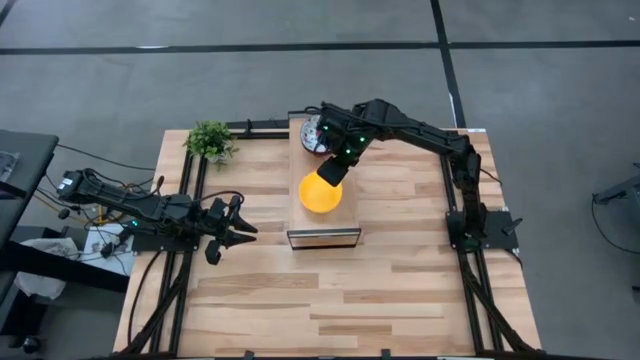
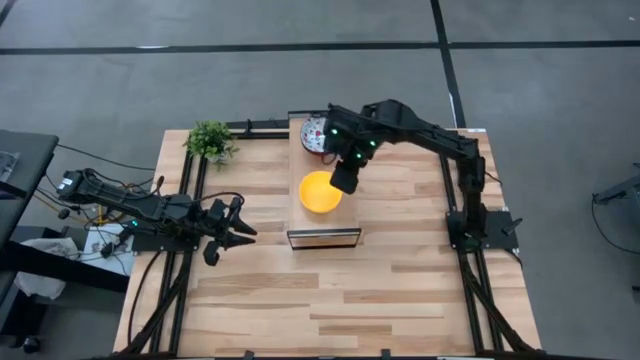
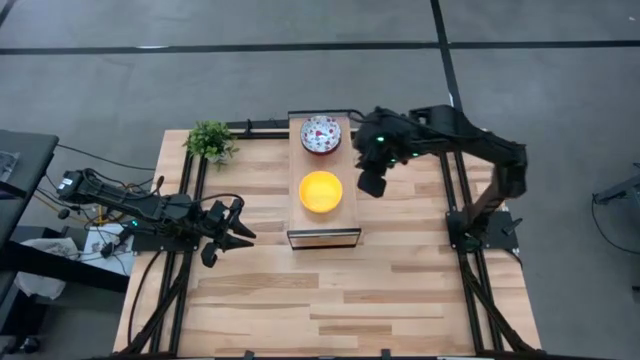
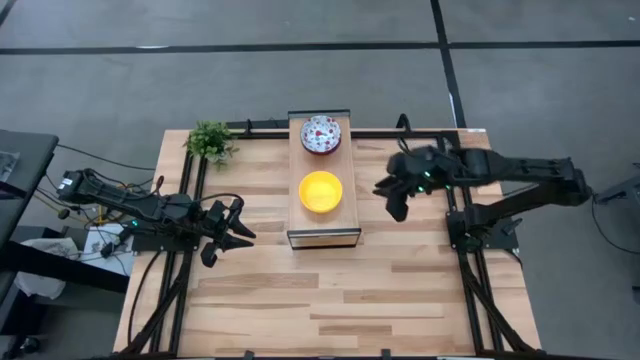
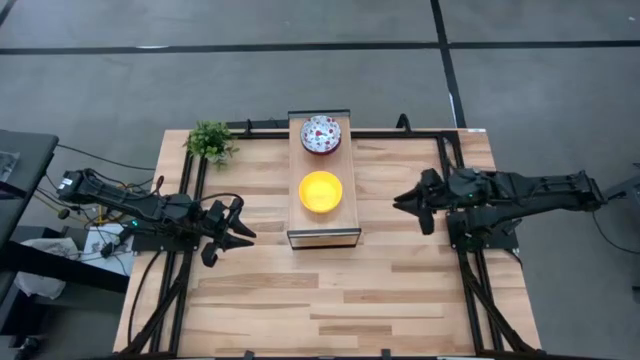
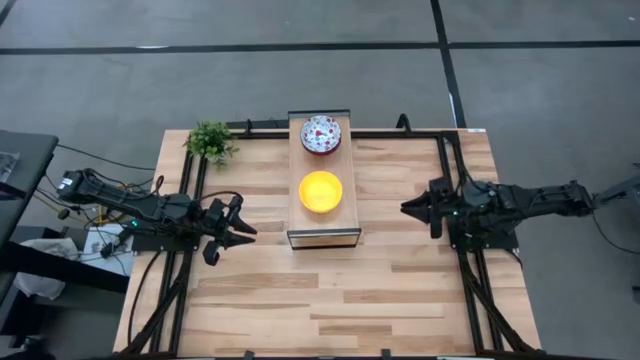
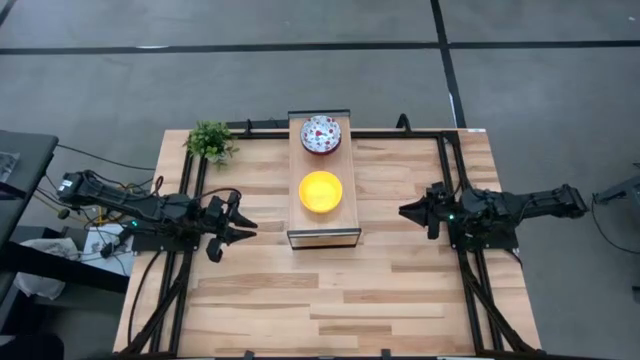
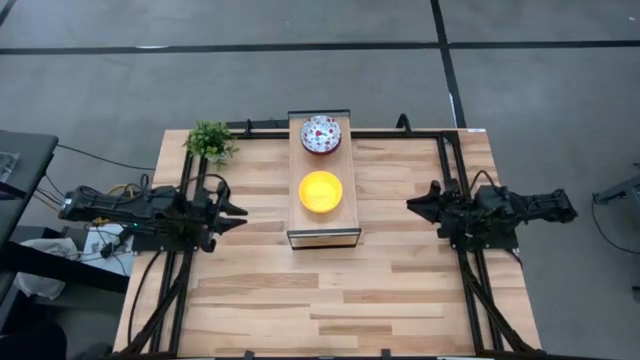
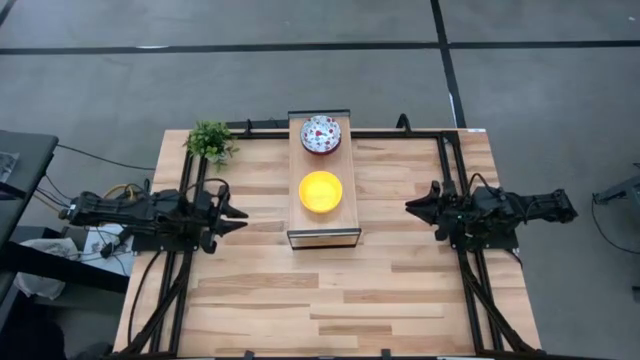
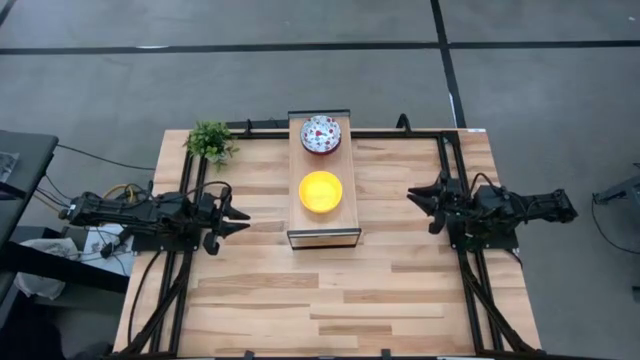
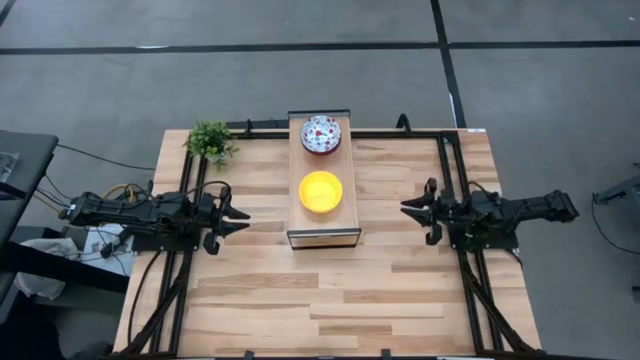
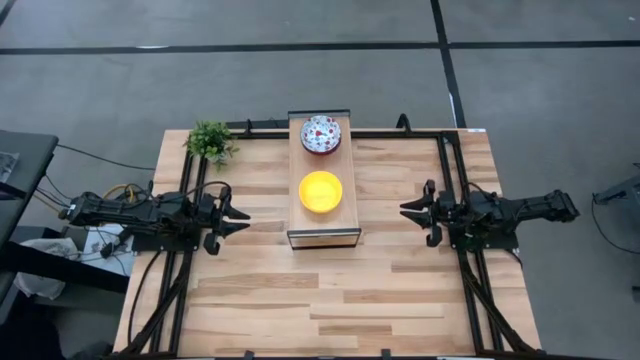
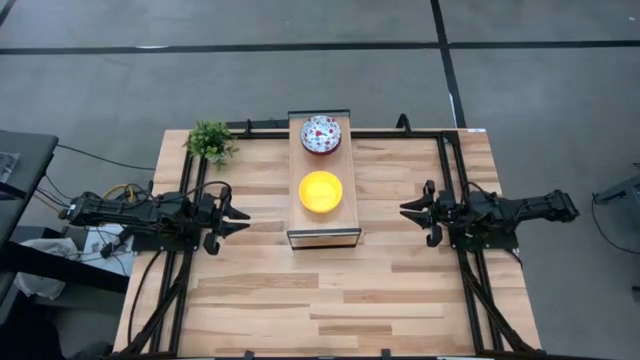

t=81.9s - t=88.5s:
Task: Pick & Place Mini bowls
Return to Home Position

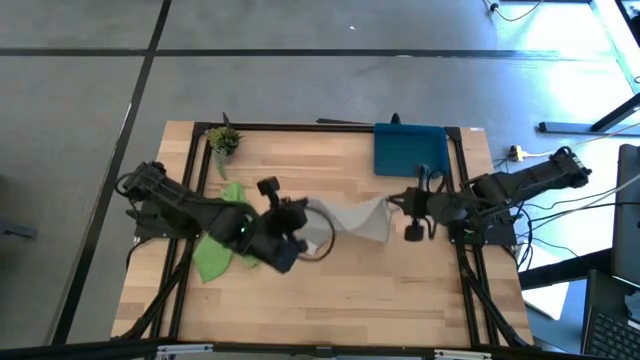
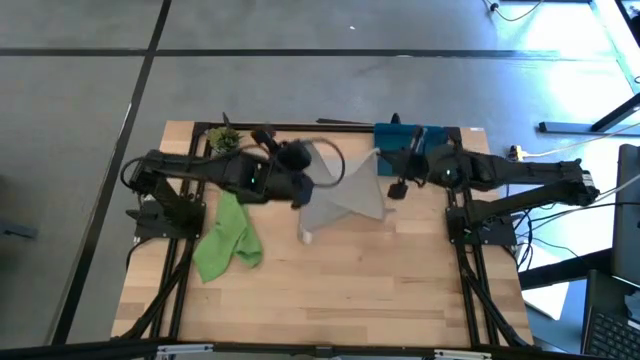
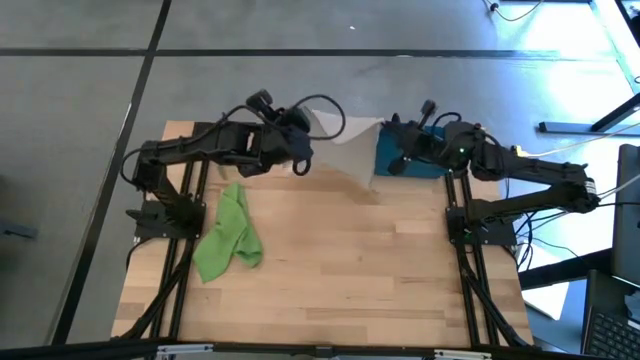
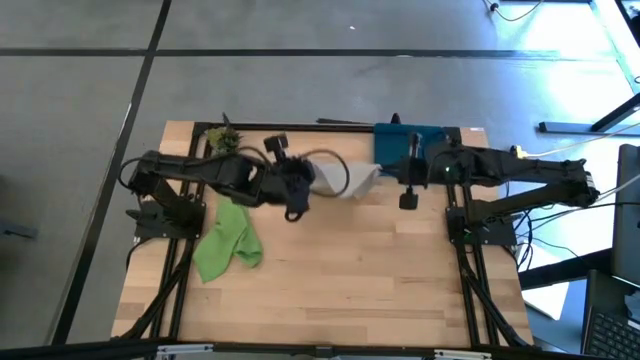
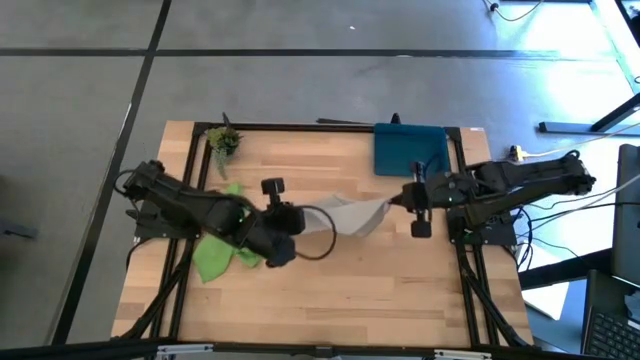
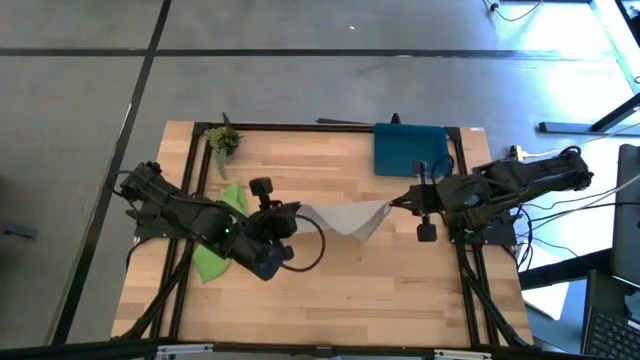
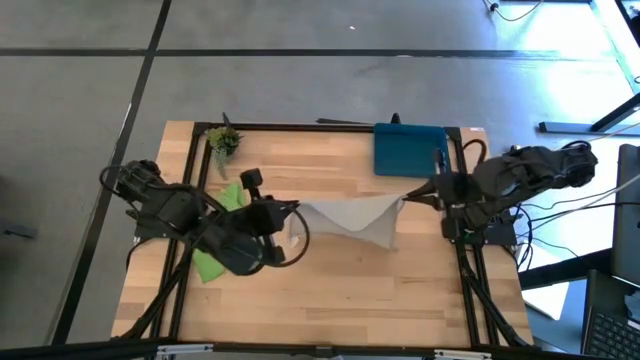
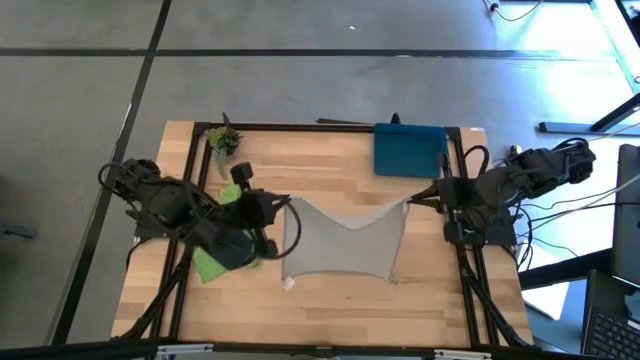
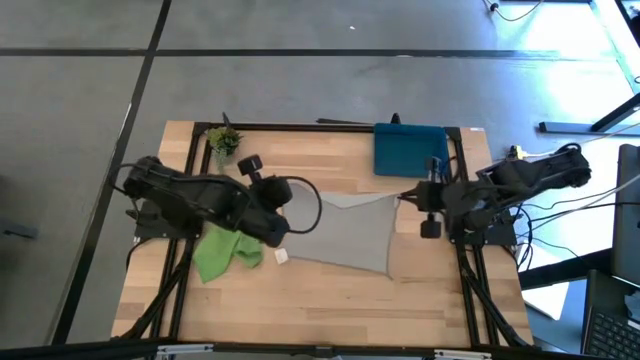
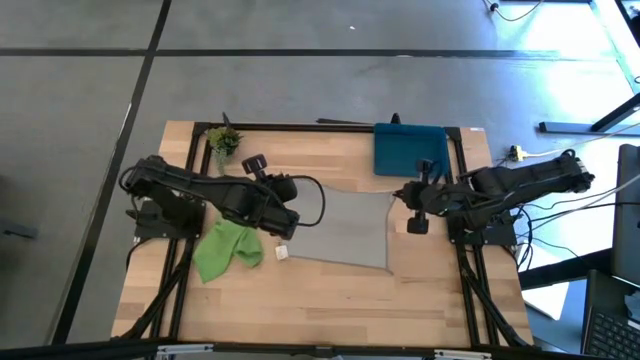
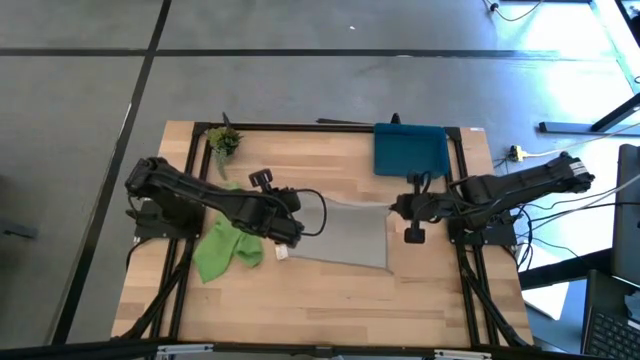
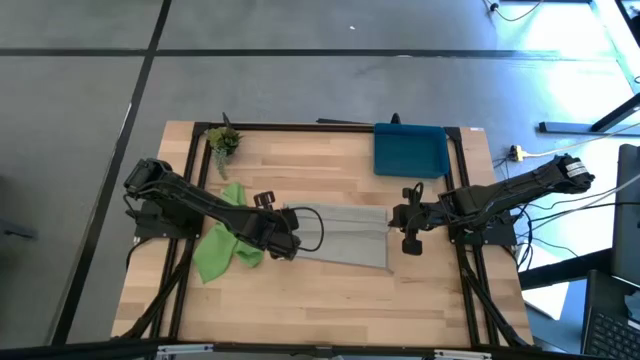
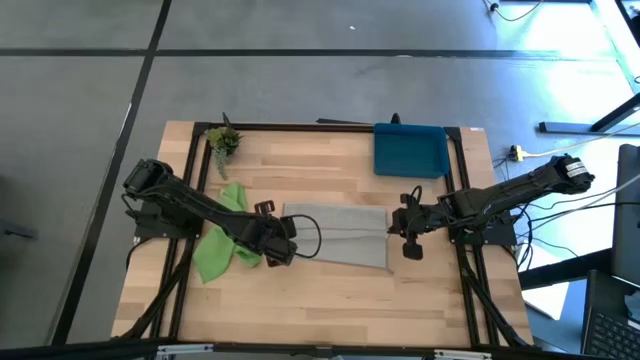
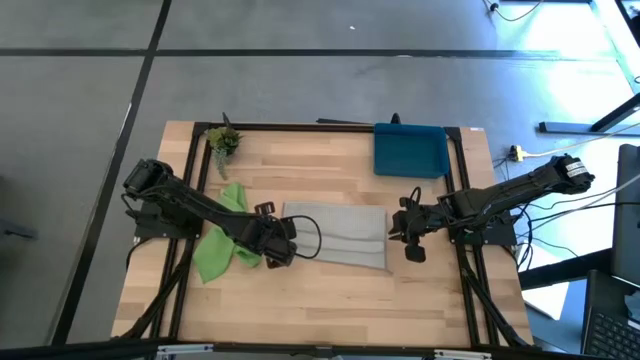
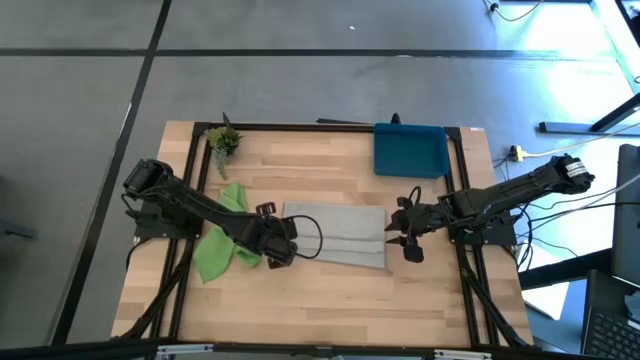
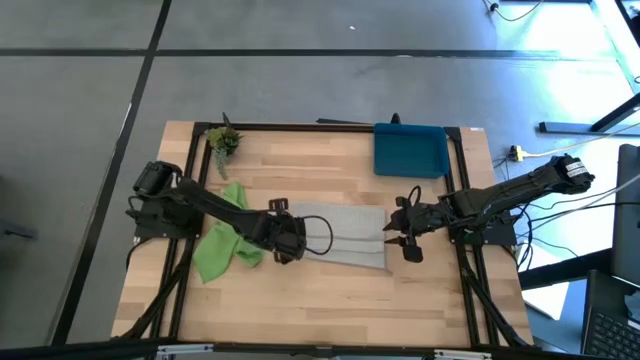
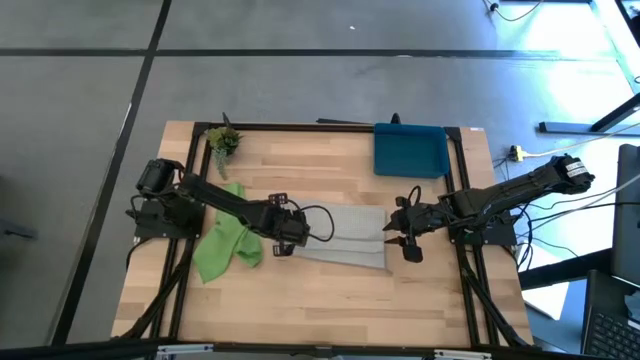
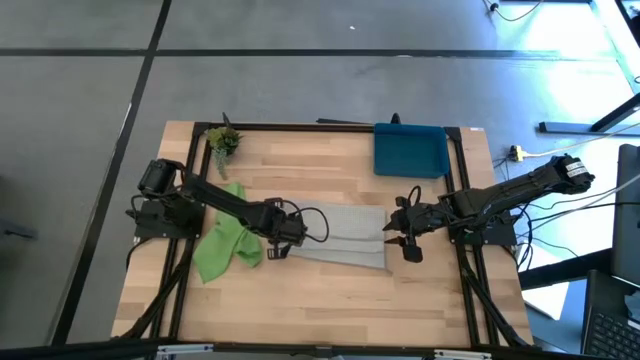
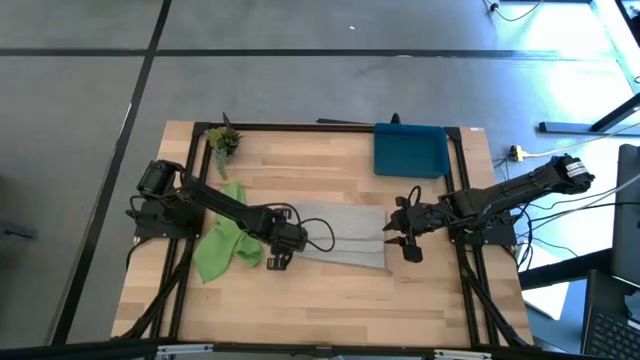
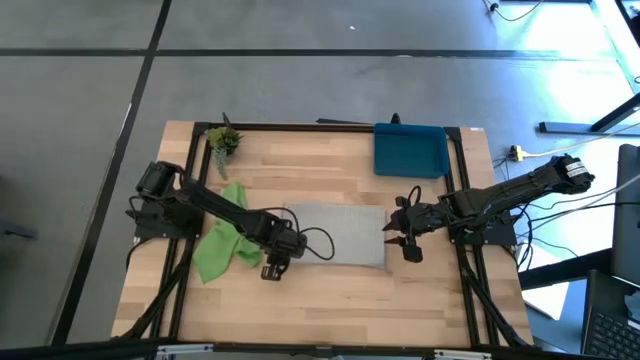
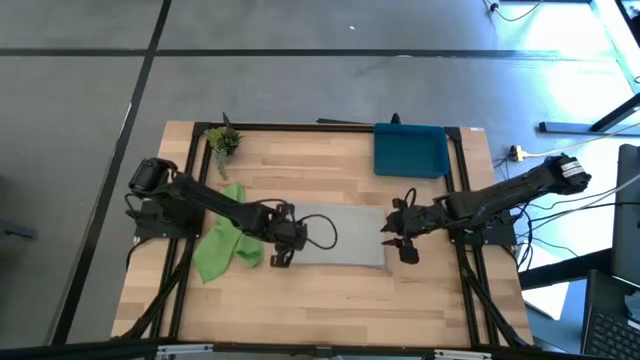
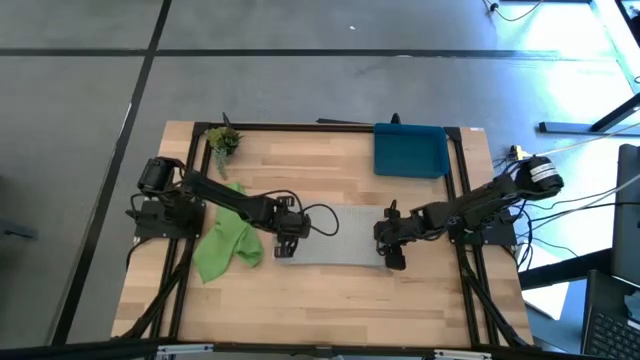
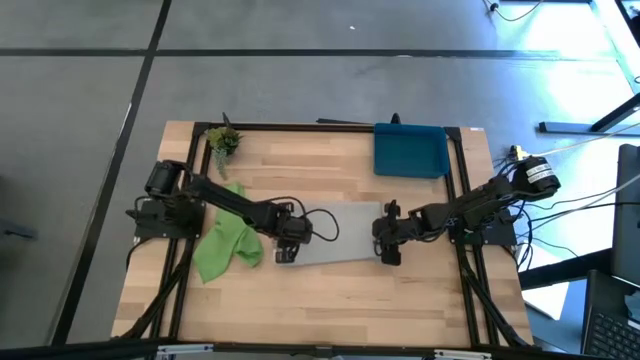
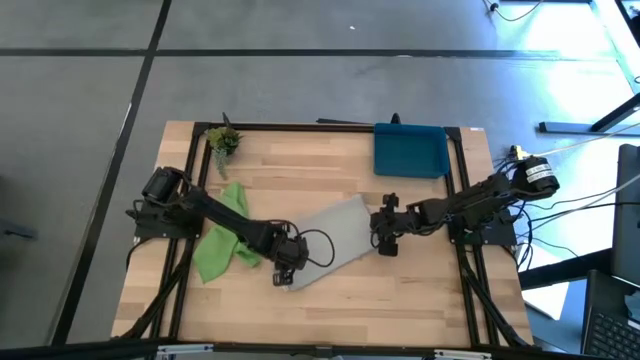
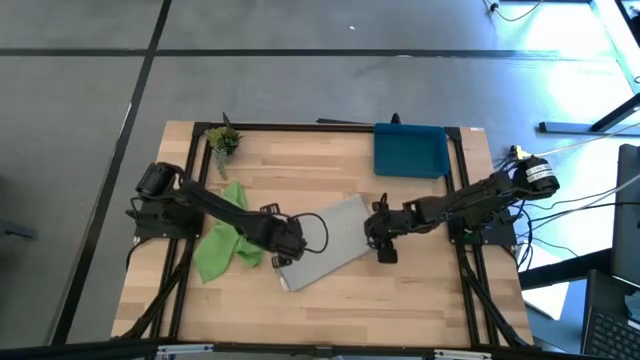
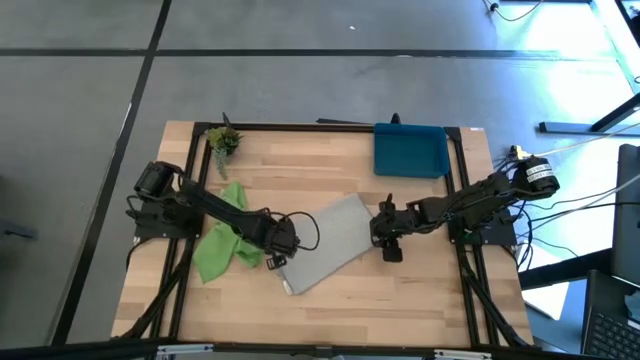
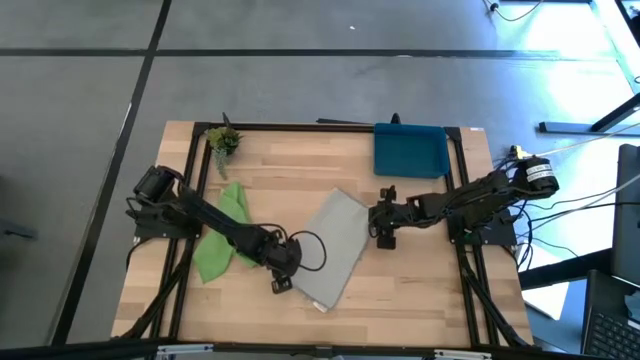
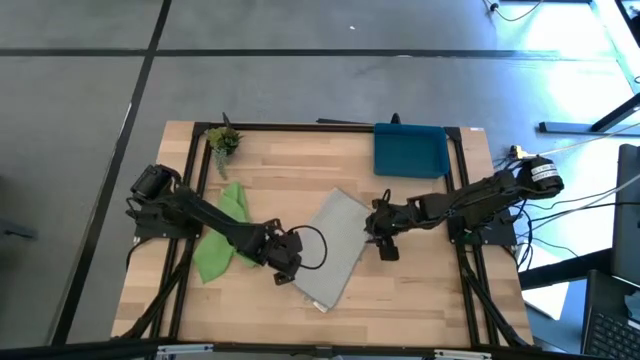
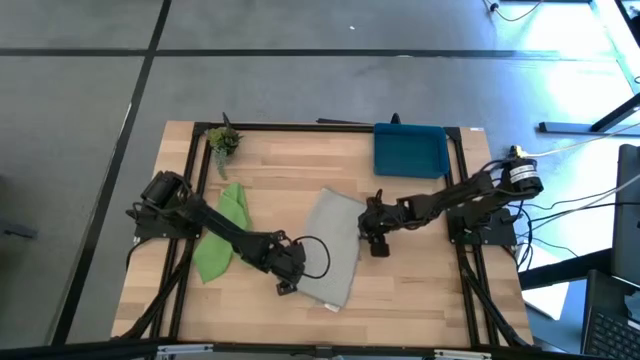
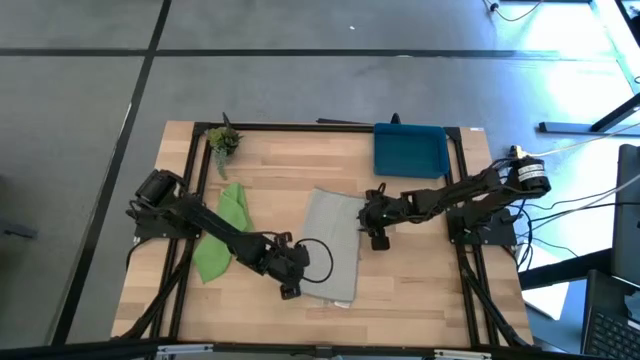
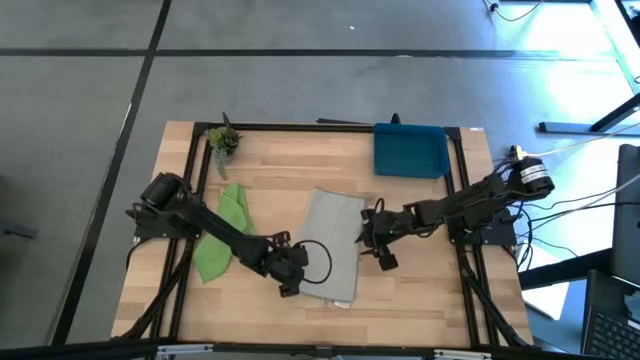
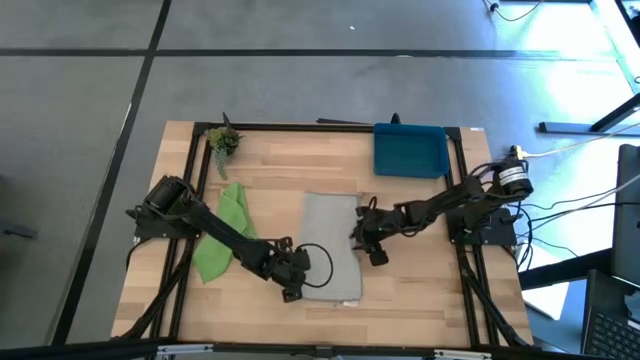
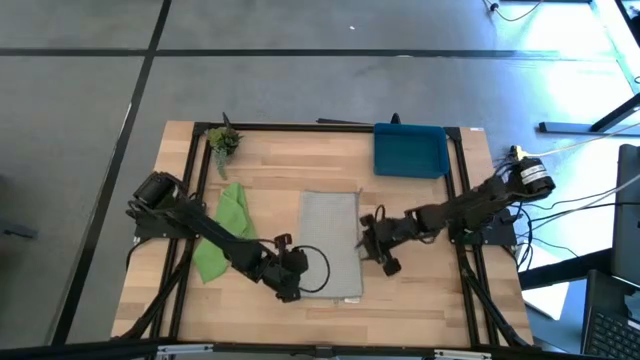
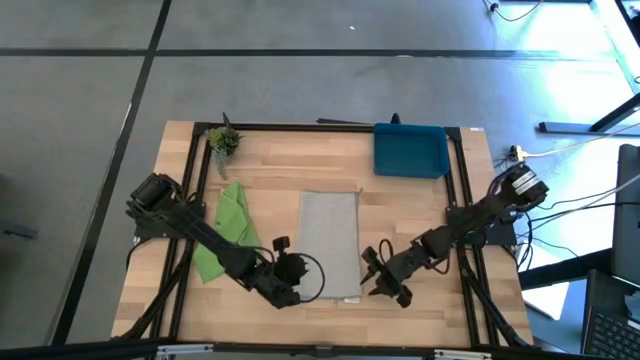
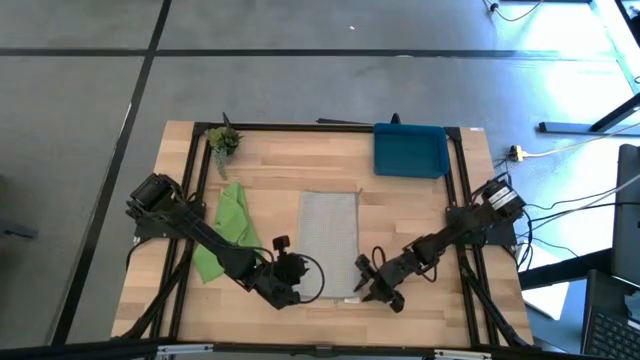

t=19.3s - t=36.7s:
Task: Roll microfiber towels into tight, uniform cylinder then place into a basket
Fold the gray microfiber cloth
